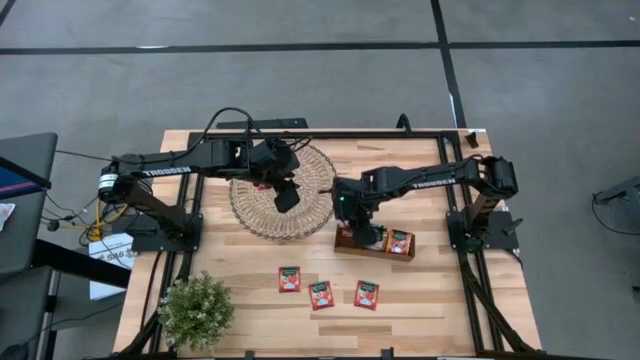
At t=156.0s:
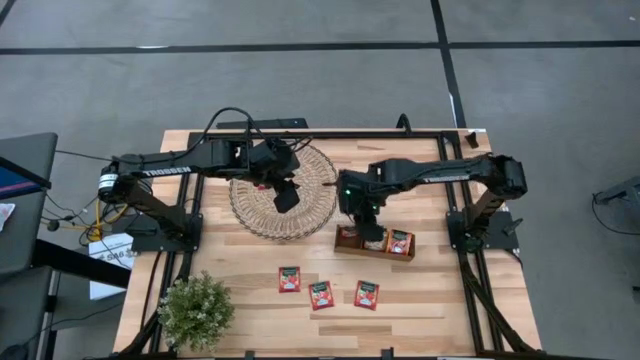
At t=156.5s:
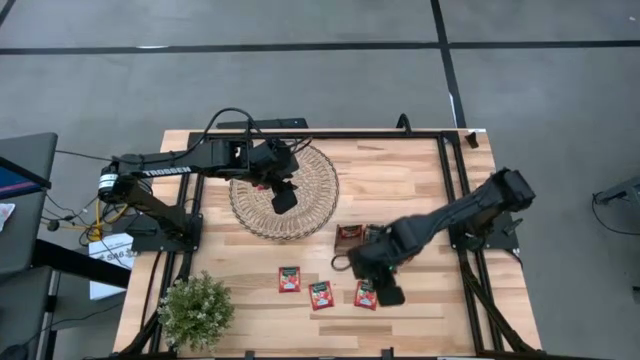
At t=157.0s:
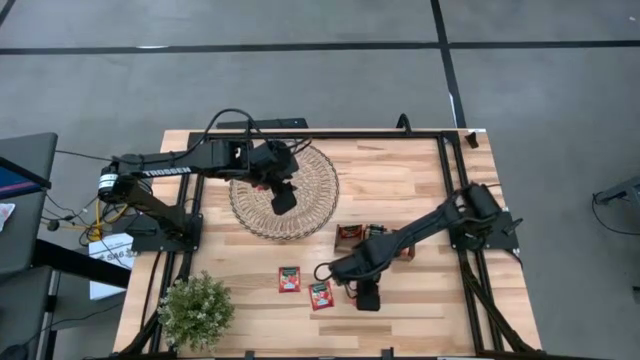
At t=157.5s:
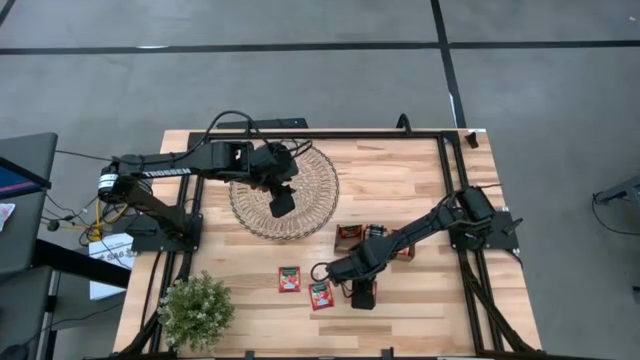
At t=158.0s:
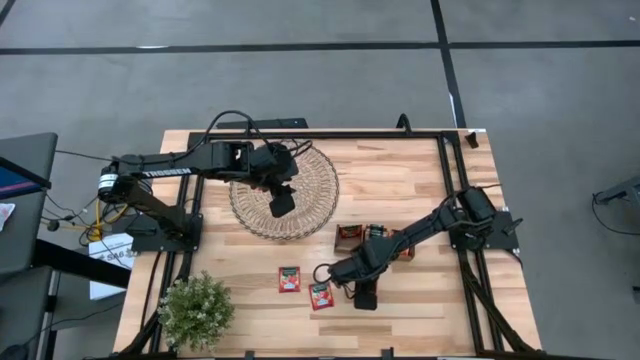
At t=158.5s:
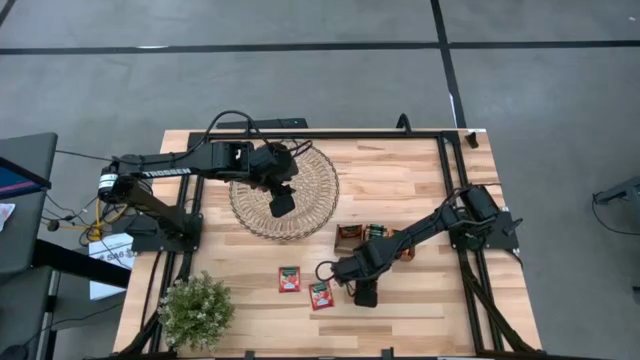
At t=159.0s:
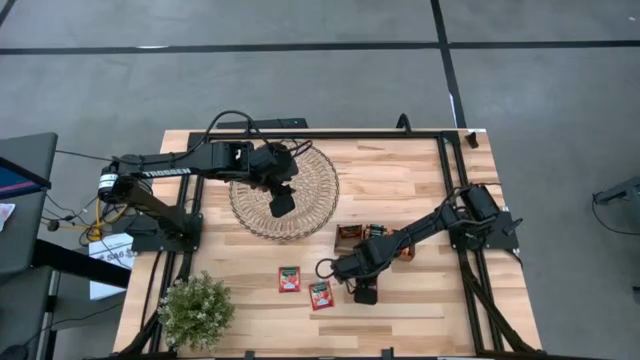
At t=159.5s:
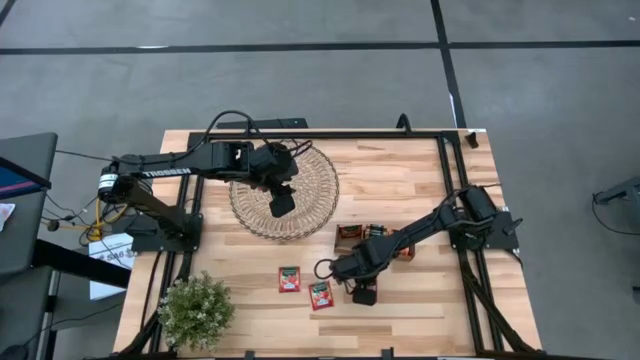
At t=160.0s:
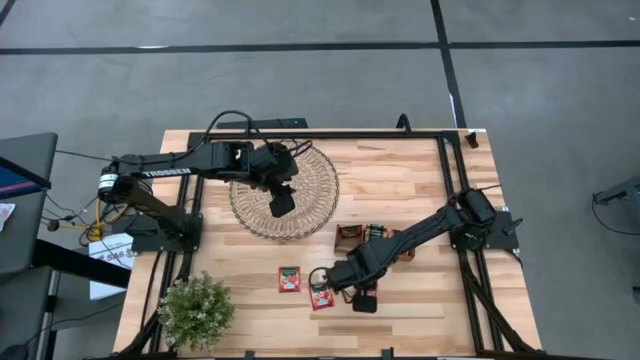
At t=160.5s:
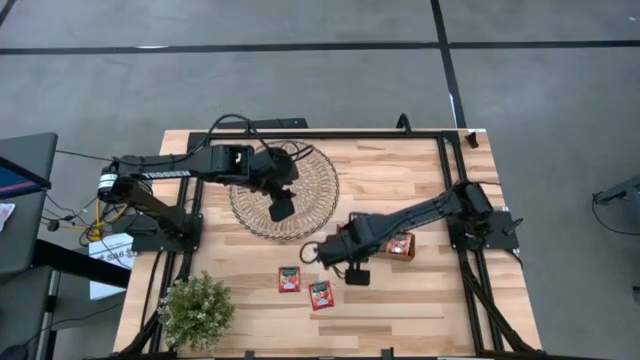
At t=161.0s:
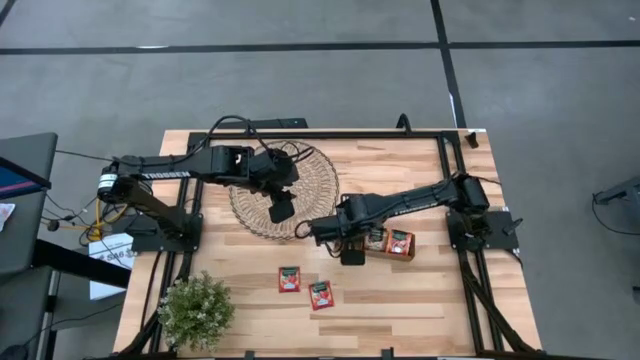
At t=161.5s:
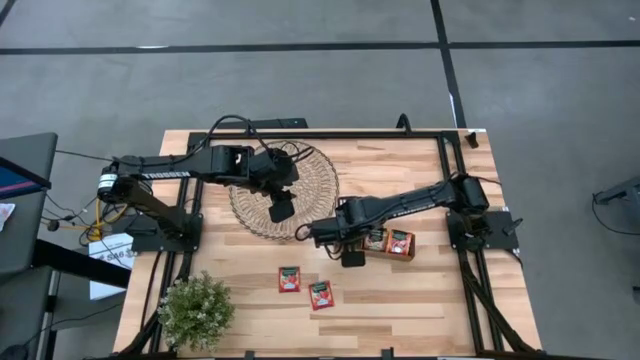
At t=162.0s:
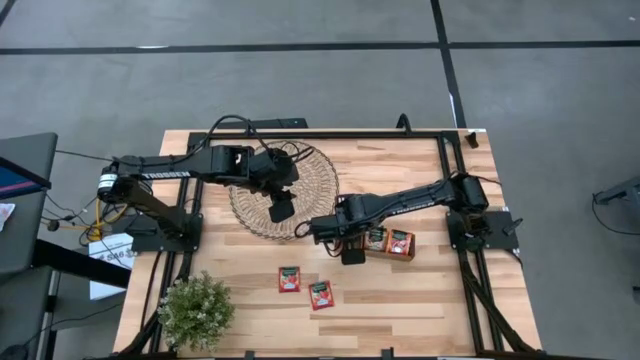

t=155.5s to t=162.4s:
Task: Pick & Place Tea
Put the red tea bag into the left section of the wooden organizer

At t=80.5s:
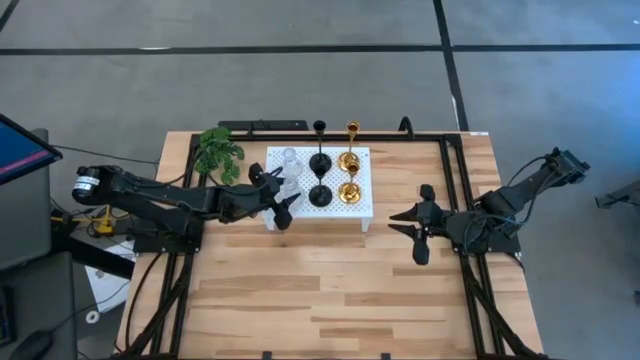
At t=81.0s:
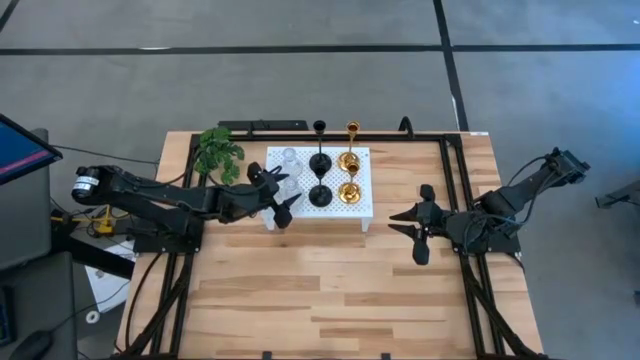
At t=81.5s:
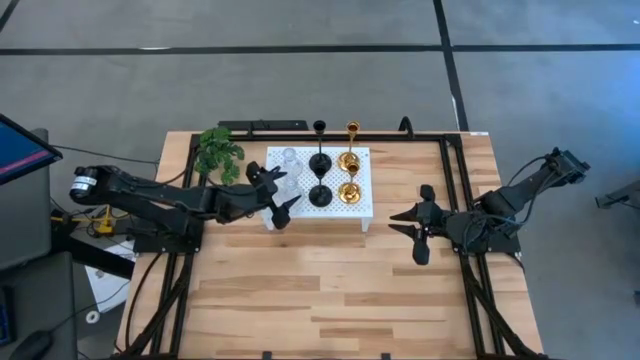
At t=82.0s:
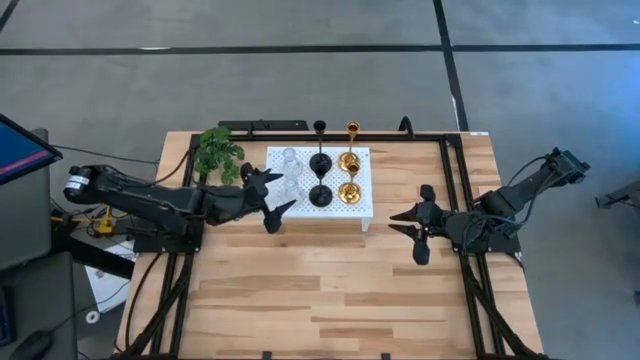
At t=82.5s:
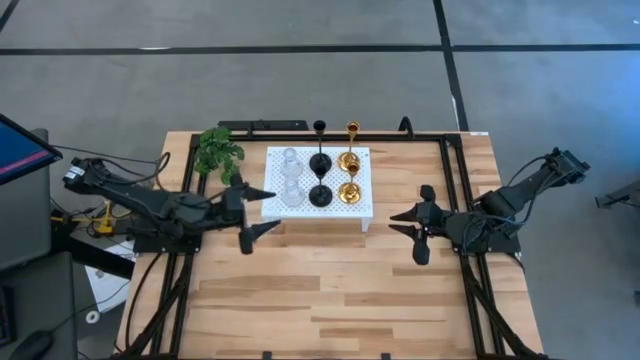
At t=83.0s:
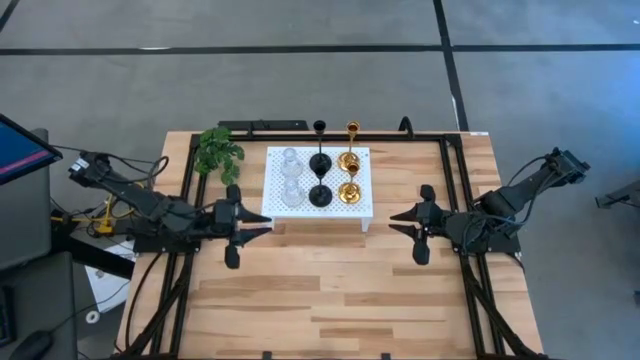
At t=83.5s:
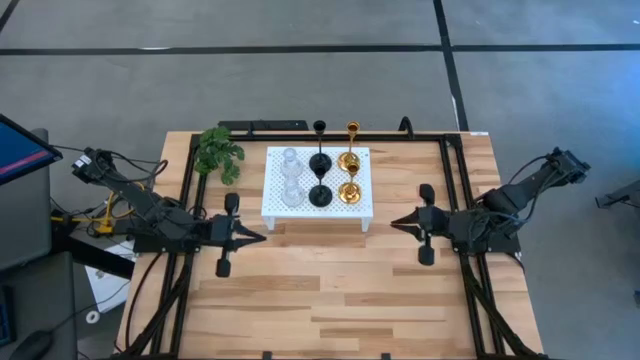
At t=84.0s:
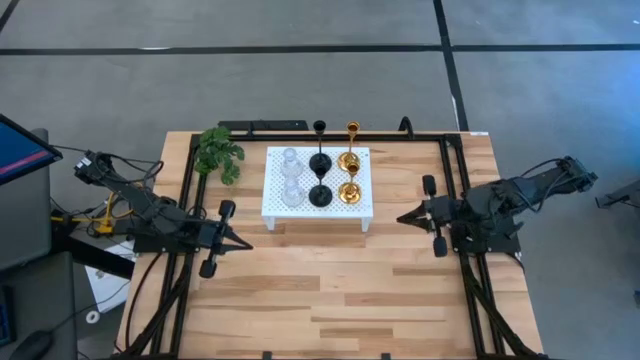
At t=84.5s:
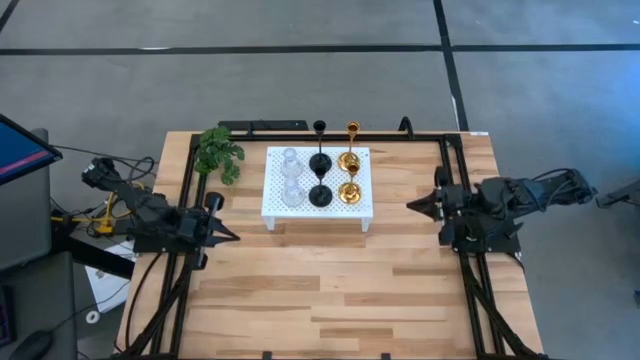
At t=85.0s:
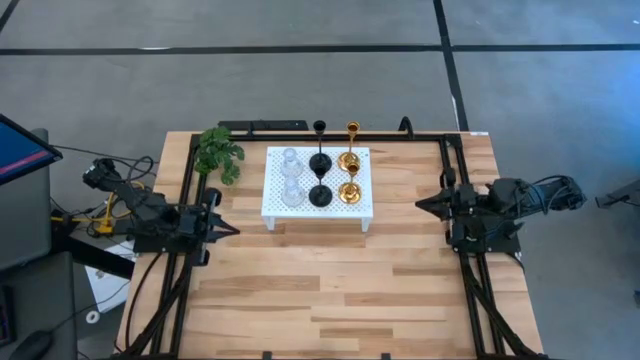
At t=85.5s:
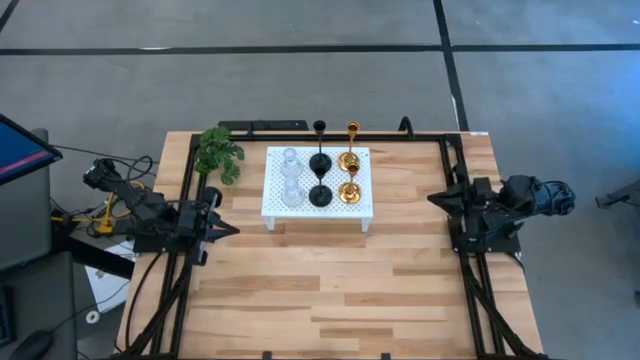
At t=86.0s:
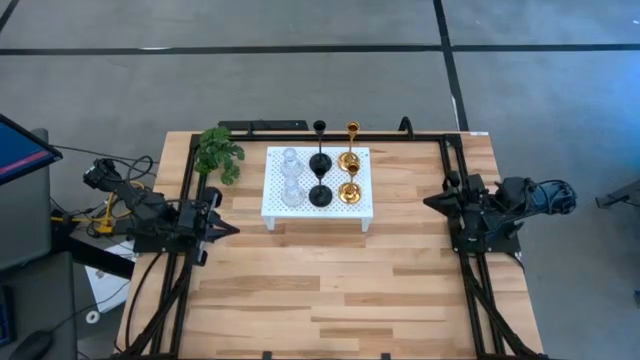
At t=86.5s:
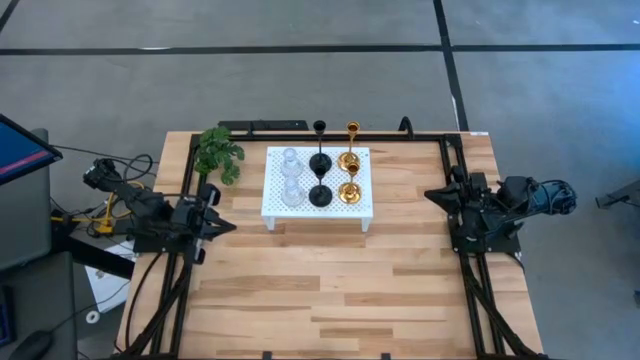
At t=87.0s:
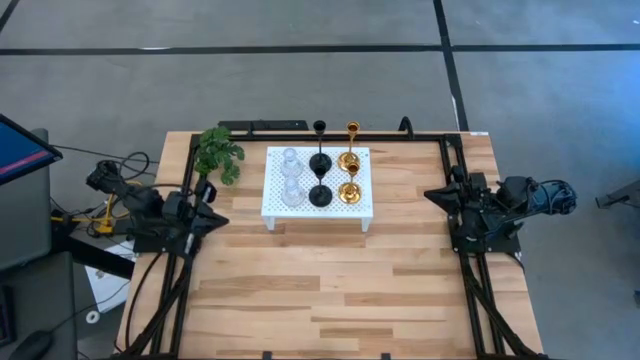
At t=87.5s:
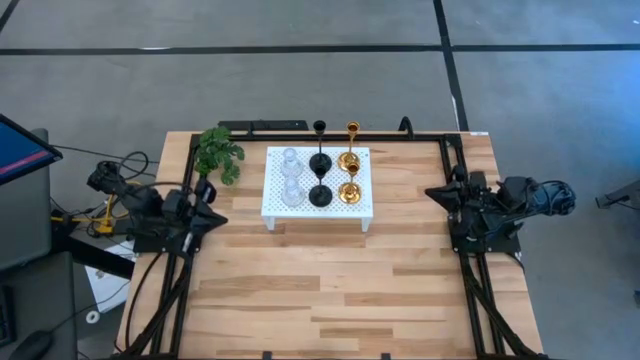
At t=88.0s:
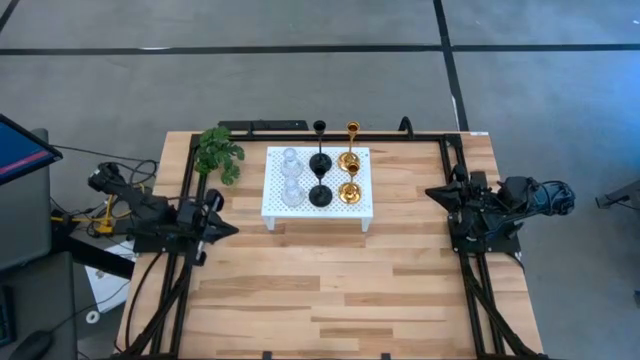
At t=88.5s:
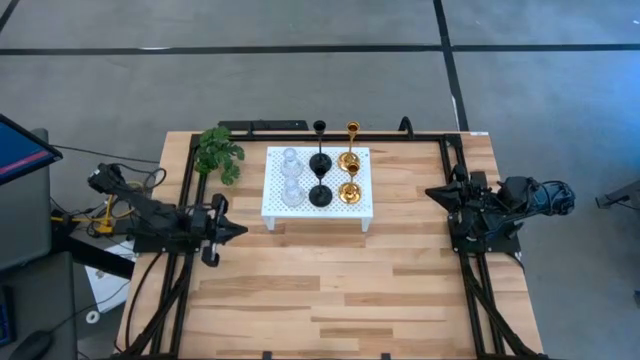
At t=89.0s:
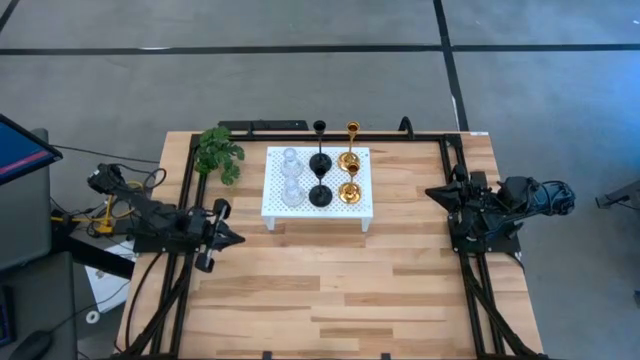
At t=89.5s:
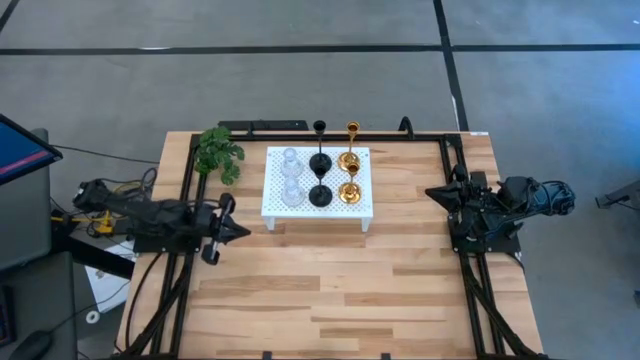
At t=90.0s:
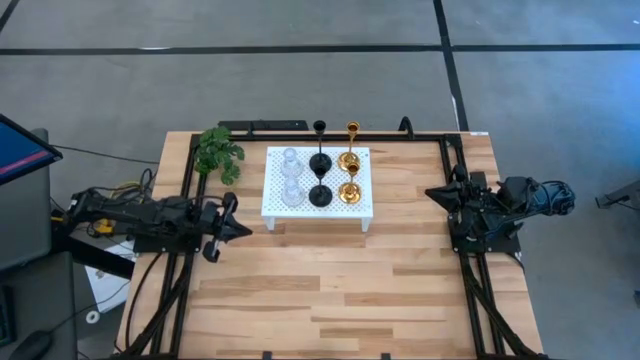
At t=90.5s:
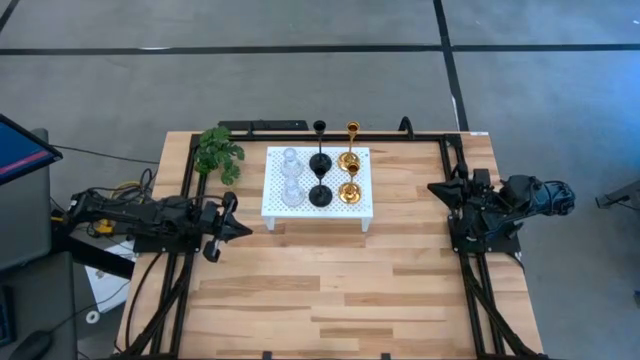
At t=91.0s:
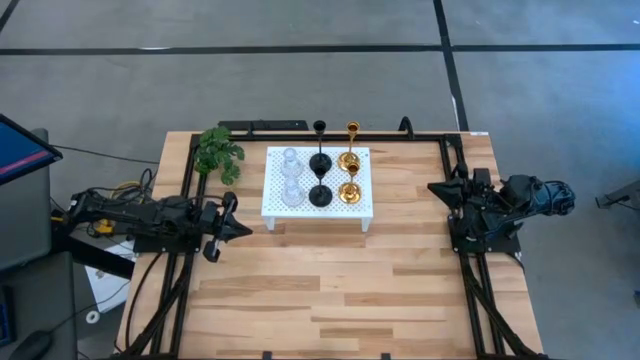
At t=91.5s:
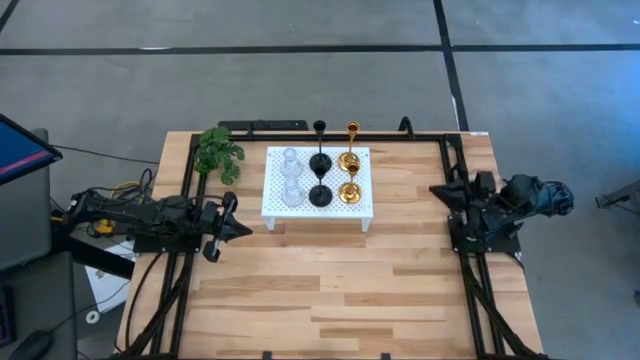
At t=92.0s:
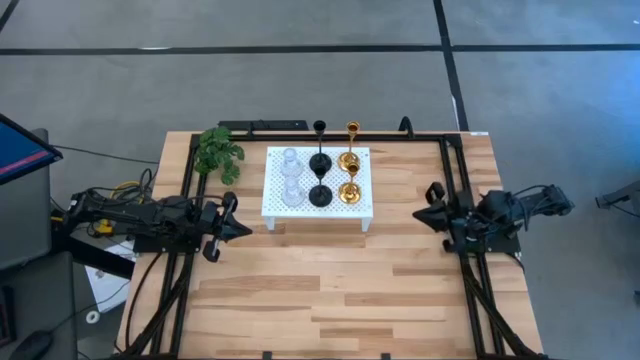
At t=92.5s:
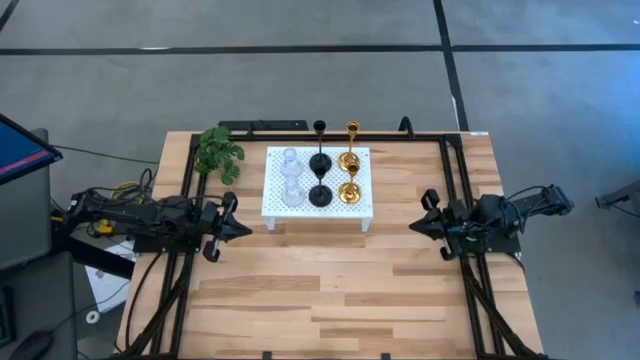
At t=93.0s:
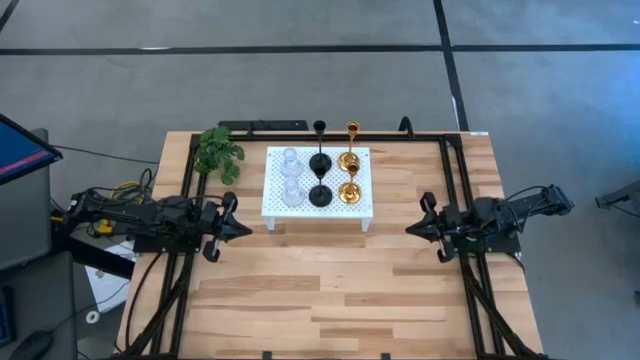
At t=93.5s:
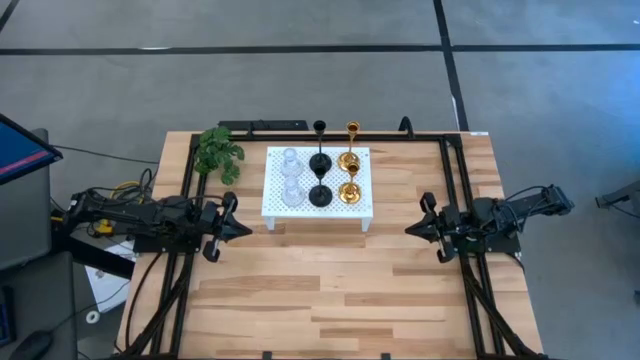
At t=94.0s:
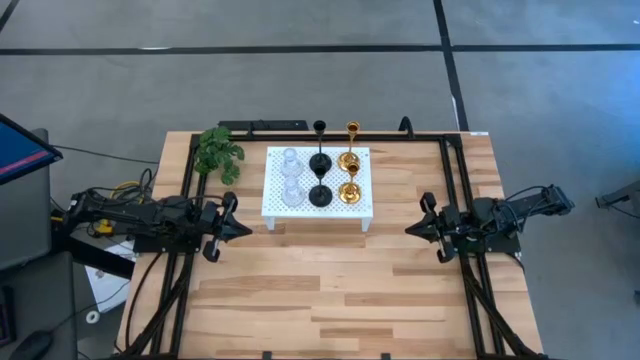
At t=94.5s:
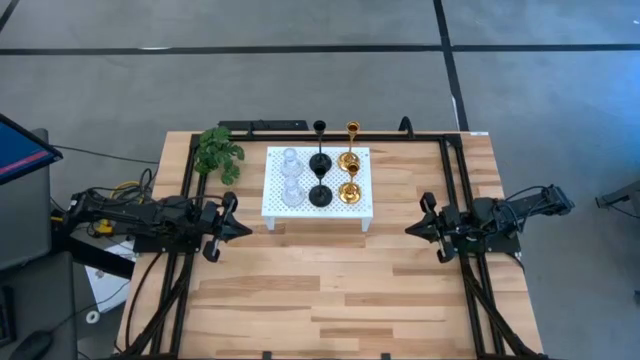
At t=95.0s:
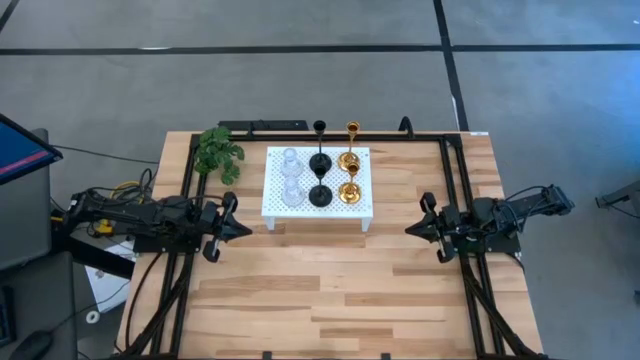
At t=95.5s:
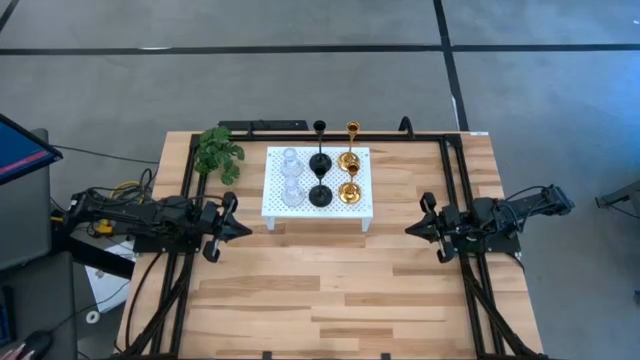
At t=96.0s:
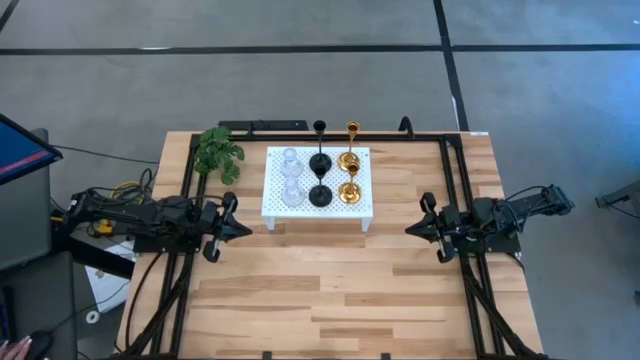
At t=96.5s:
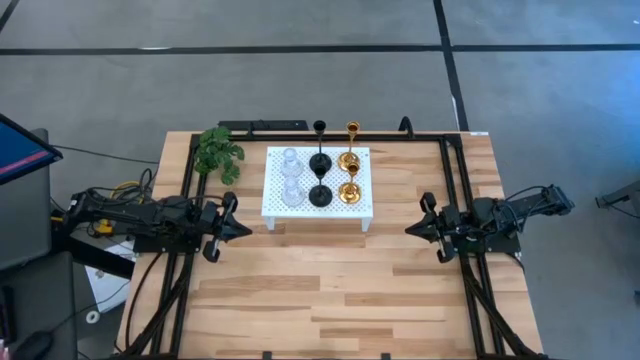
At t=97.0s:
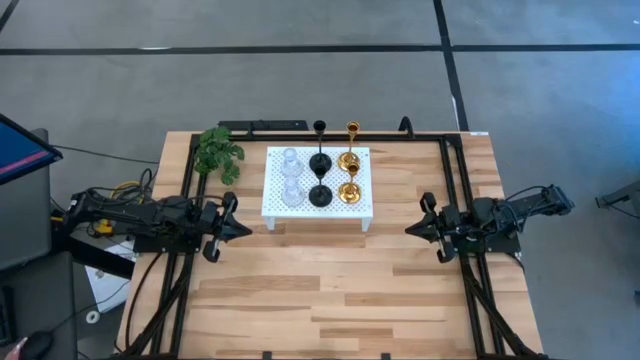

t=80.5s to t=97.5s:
Task: Pick & Place candle stick holders
Return to Home Position
